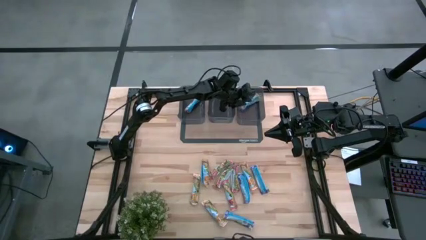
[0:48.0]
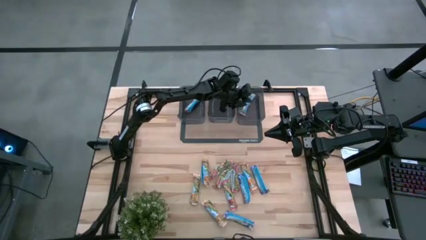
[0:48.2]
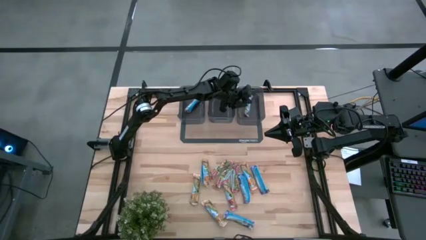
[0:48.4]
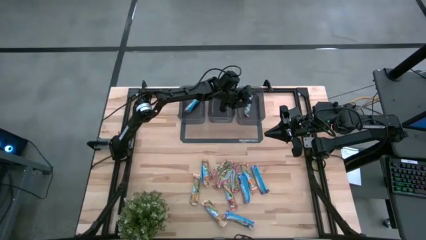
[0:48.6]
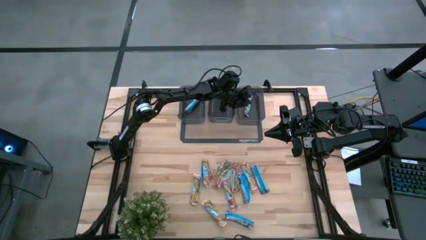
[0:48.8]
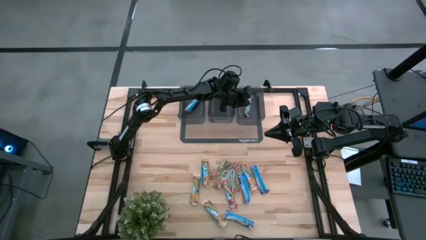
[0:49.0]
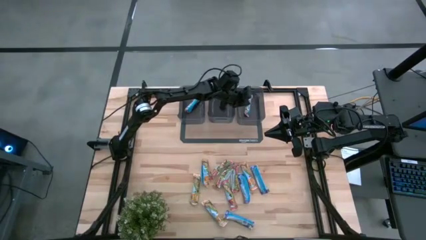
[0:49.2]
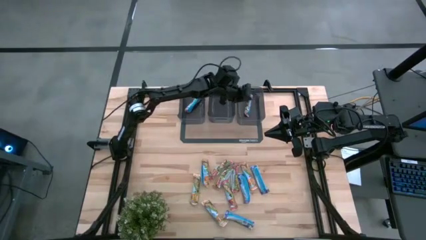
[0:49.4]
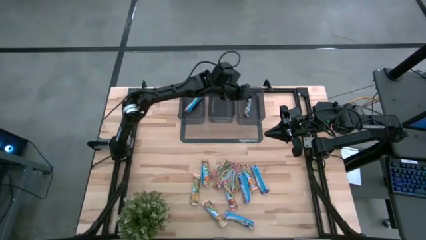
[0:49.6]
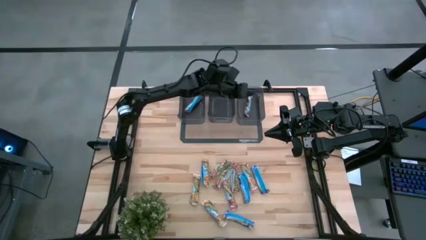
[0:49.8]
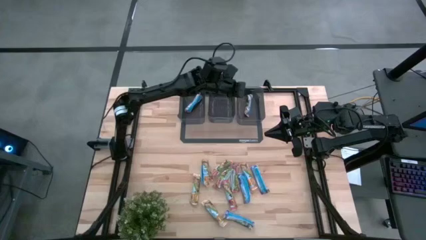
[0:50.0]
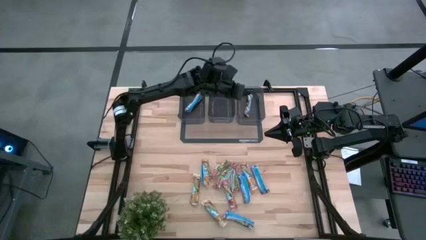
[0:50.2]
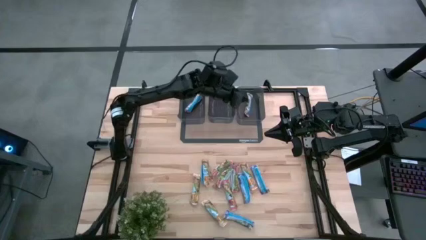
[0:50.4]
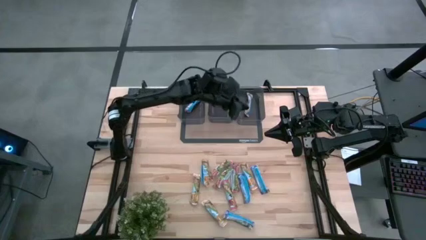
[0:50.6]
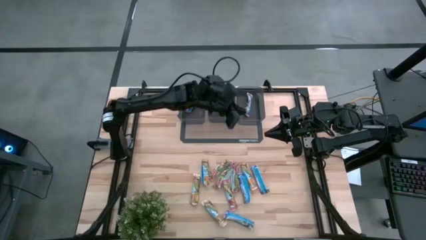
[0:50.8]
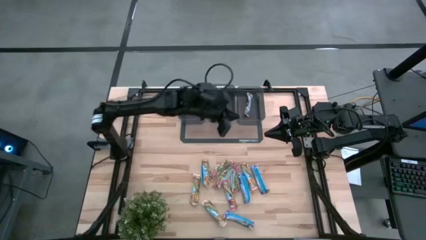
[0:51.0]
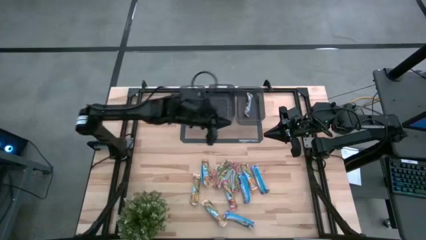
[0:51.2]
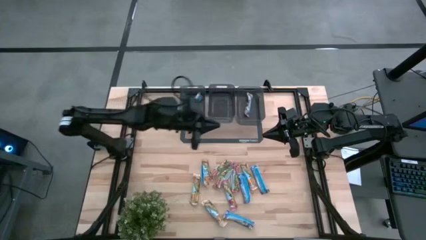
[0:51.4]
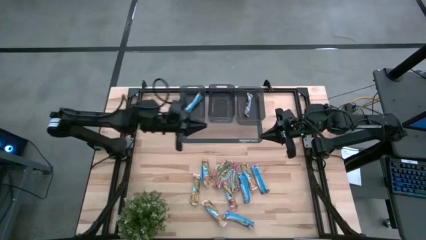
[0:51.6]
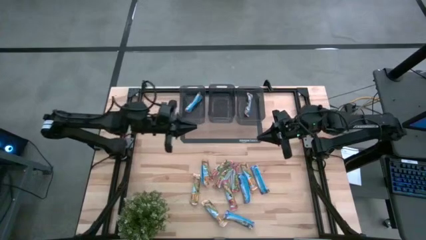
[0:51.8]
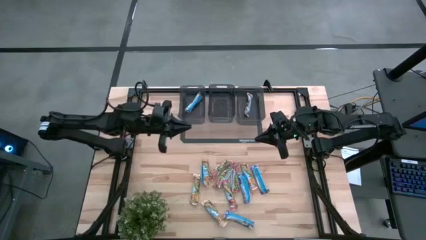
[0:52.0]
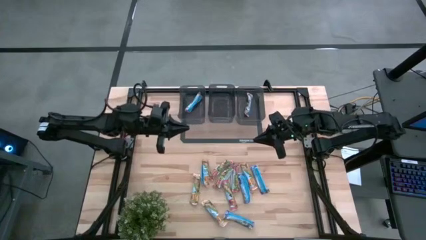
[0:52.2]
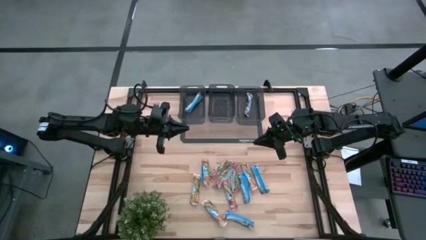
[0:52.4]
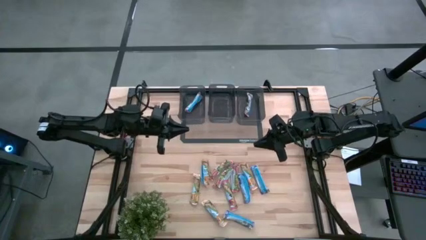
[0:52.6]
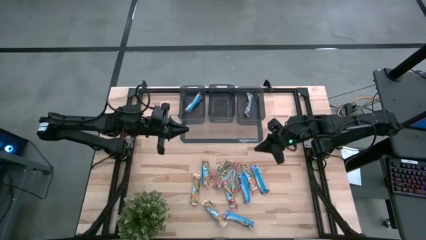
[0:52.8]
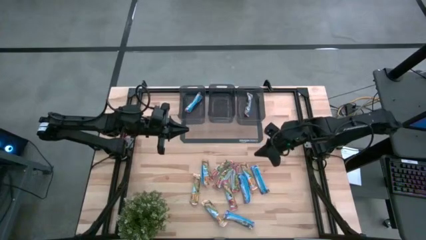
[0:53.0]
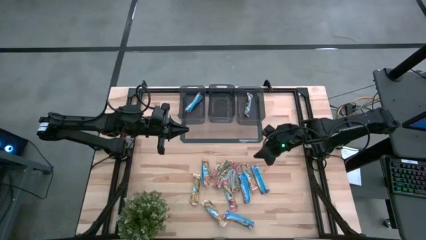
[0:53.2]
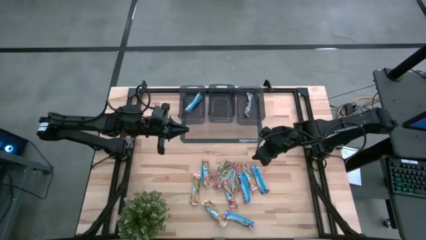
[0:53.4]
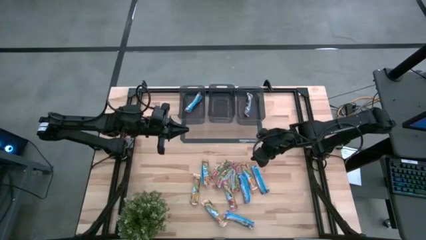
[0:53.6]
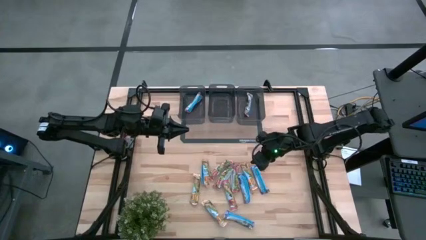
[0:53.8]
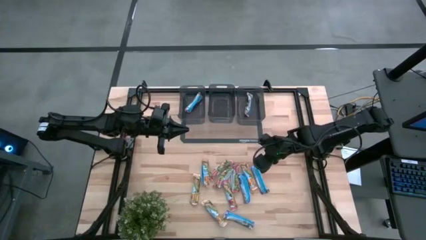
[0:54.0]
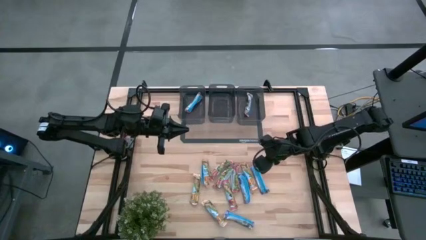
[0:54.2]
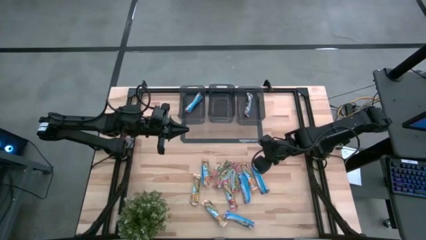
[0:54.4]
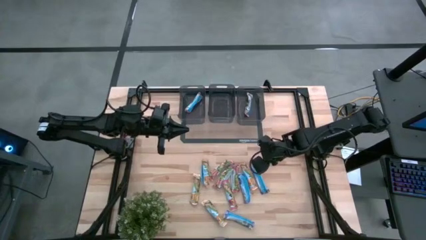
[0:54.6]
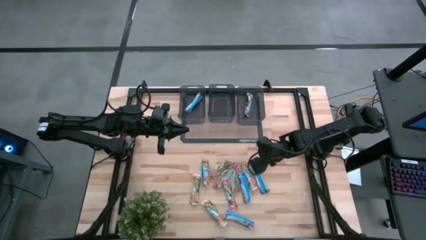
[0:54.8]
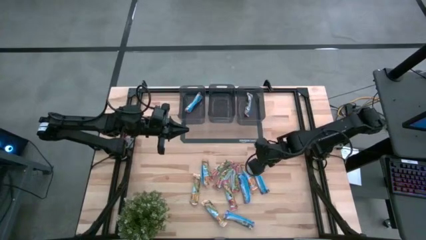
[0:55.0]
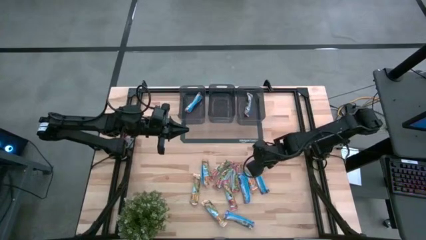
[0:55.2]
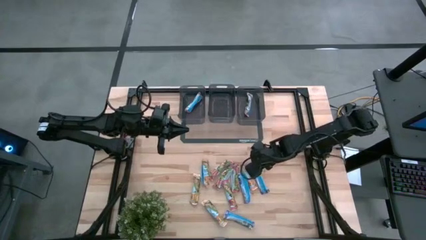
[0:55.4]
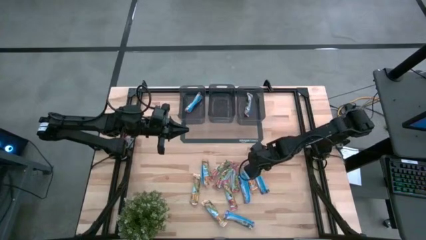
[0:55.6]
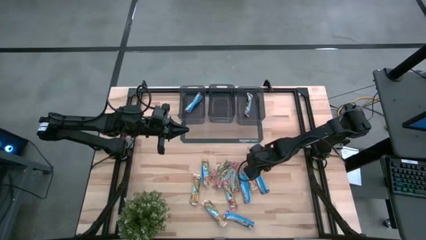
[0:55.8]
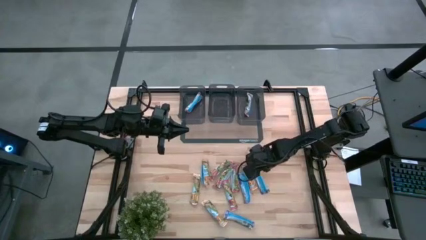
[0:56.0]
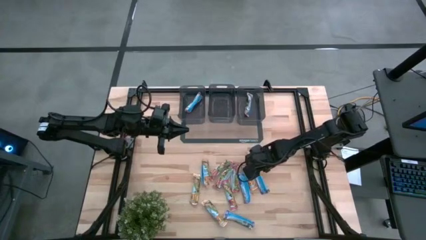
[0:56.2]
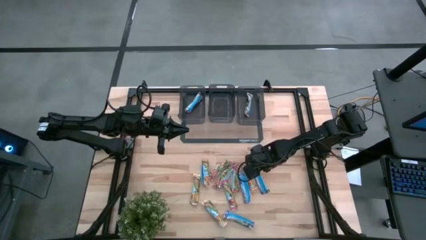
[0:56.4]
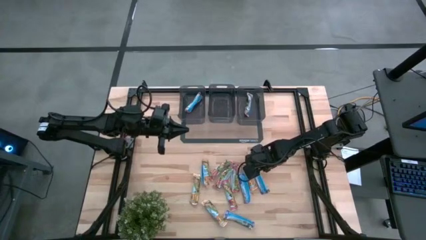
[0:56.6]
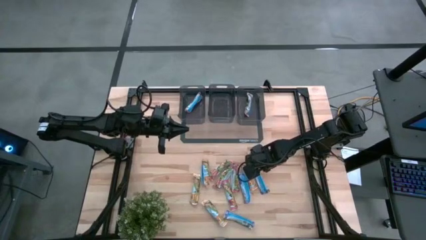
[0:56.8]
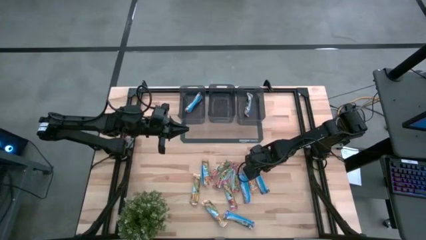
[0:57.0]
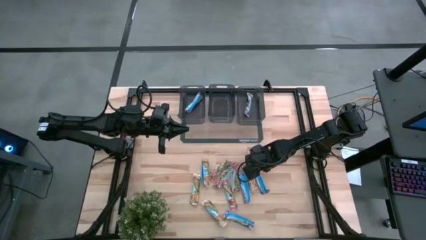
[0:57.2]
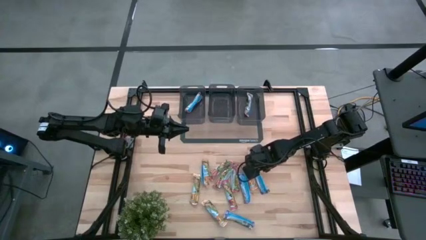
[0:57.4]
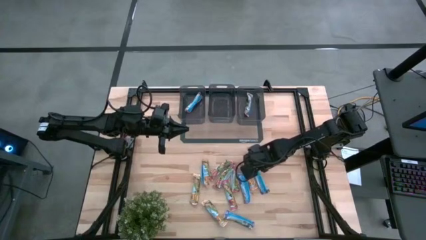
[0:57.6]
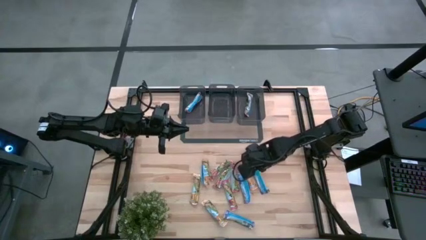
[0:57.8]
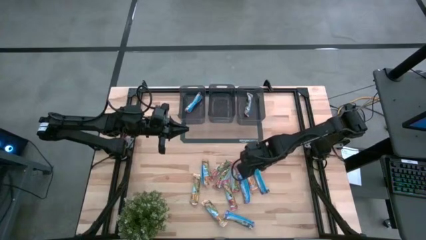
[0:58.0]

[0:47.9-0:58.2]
Task: Pick and place Granola Bars by type
Put the blue granola bar into the center black bin

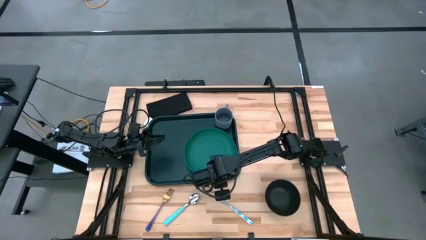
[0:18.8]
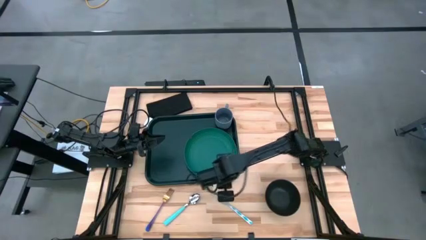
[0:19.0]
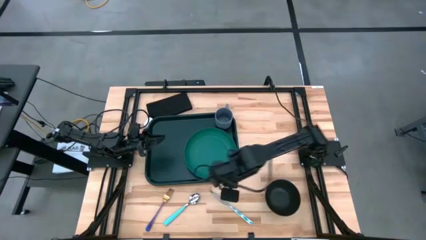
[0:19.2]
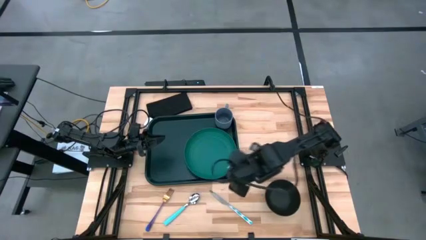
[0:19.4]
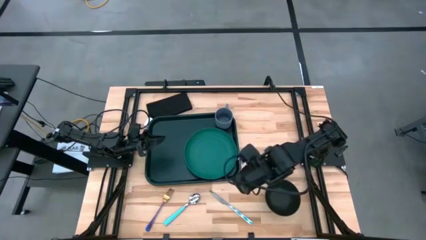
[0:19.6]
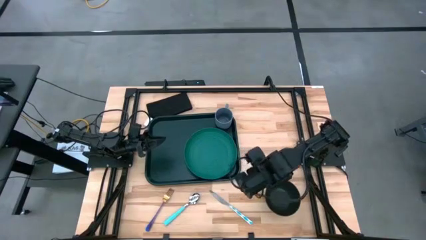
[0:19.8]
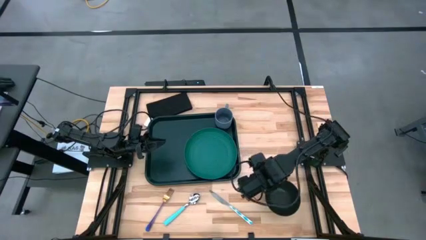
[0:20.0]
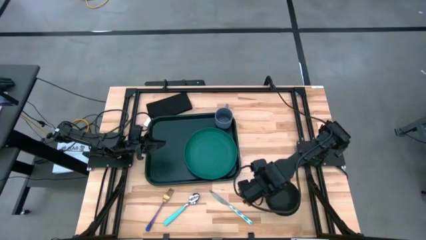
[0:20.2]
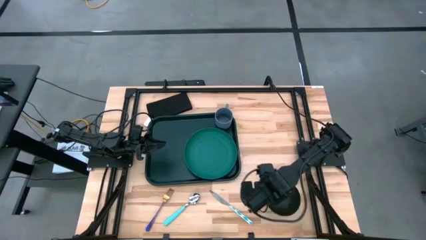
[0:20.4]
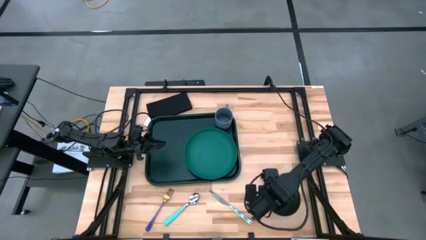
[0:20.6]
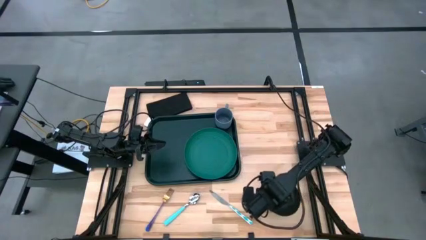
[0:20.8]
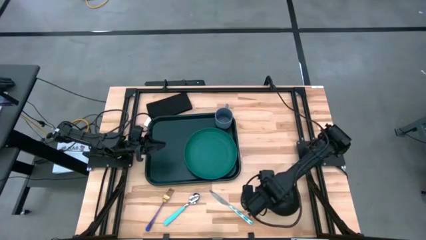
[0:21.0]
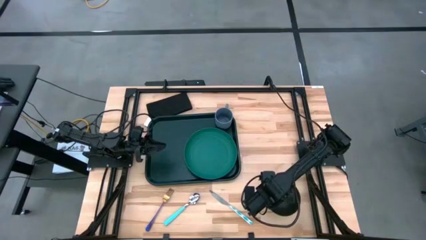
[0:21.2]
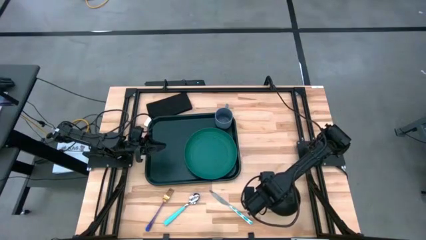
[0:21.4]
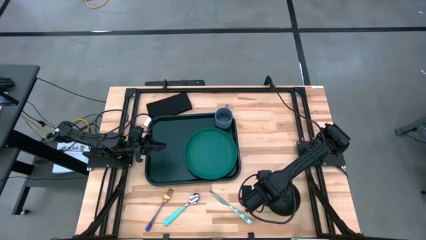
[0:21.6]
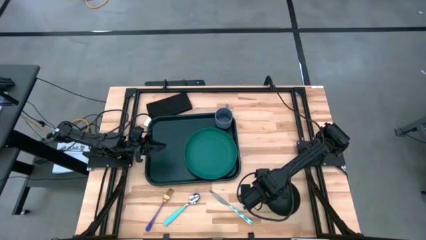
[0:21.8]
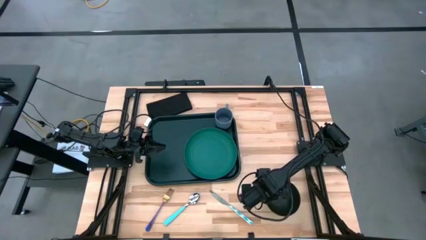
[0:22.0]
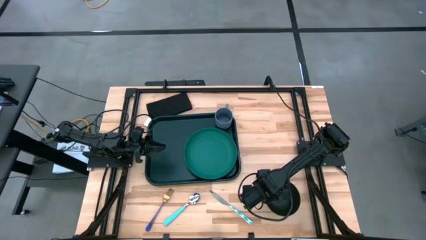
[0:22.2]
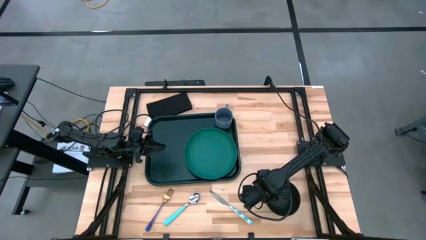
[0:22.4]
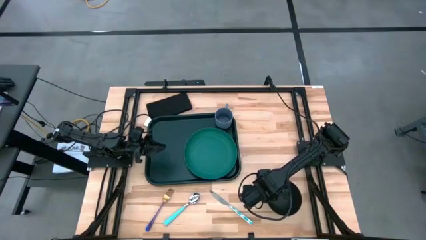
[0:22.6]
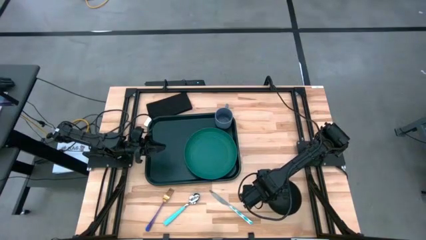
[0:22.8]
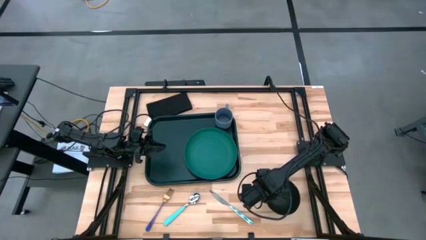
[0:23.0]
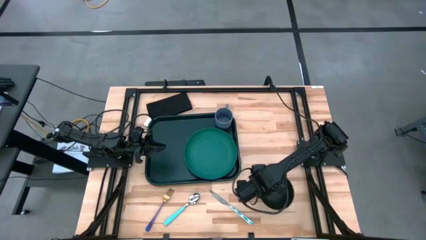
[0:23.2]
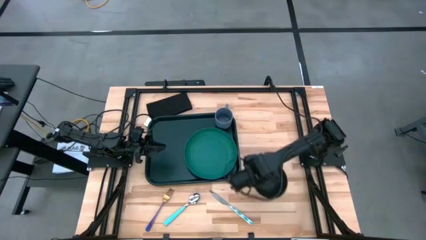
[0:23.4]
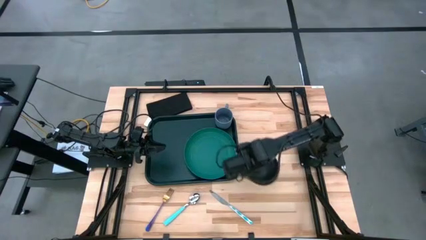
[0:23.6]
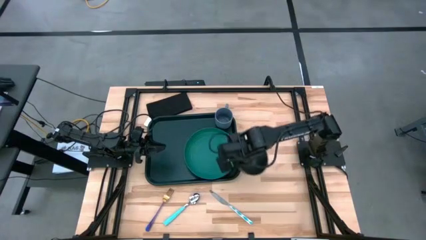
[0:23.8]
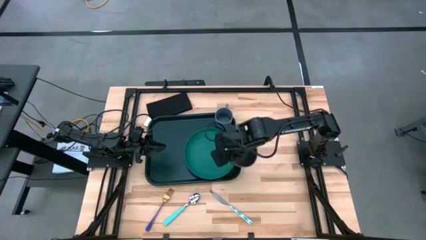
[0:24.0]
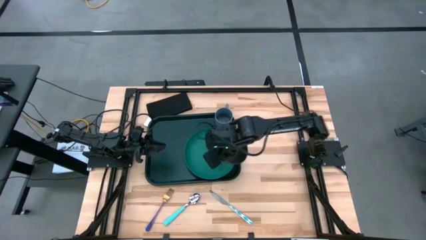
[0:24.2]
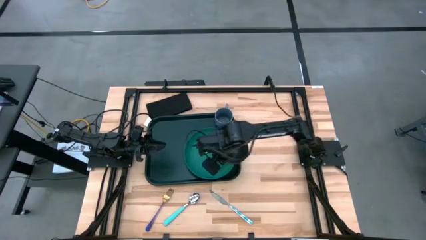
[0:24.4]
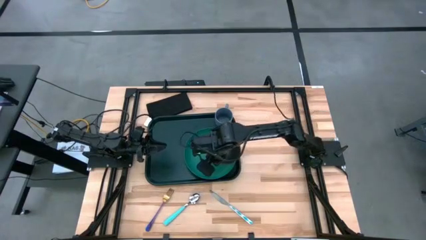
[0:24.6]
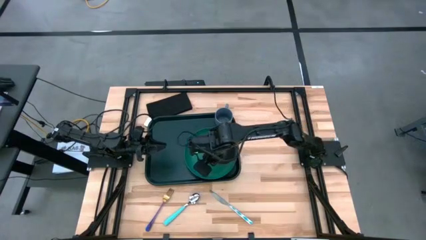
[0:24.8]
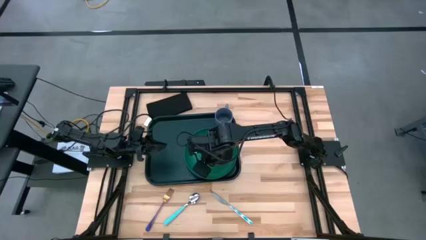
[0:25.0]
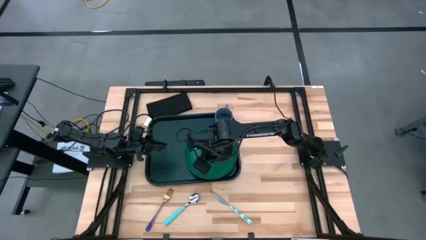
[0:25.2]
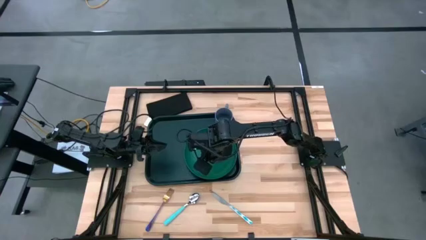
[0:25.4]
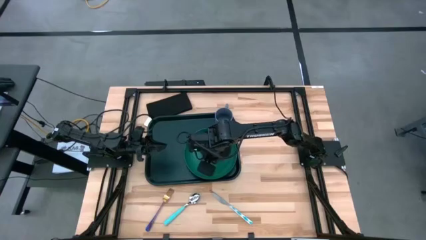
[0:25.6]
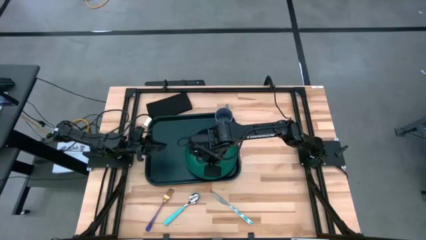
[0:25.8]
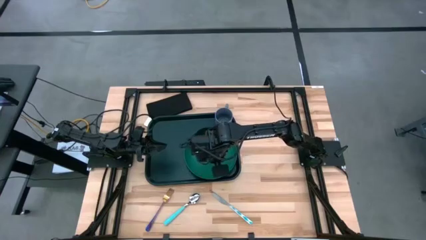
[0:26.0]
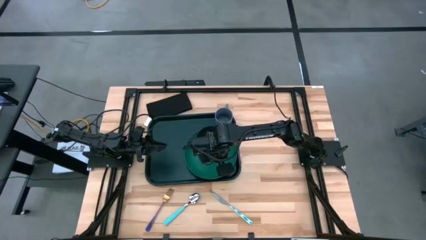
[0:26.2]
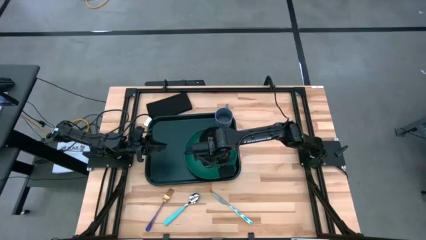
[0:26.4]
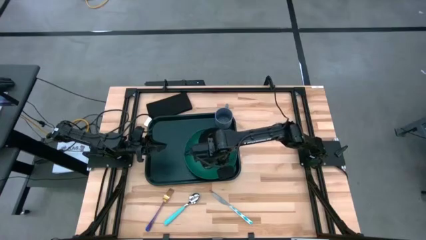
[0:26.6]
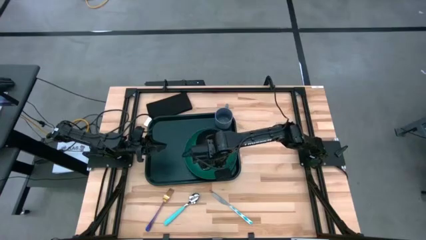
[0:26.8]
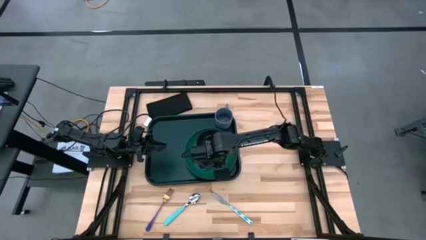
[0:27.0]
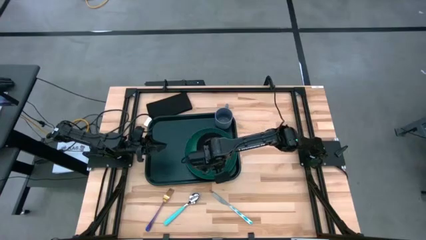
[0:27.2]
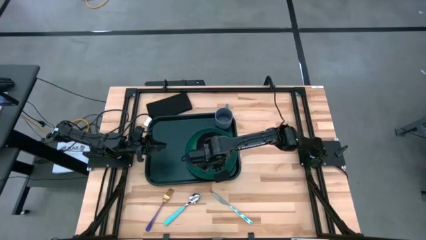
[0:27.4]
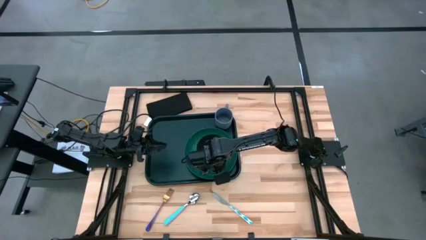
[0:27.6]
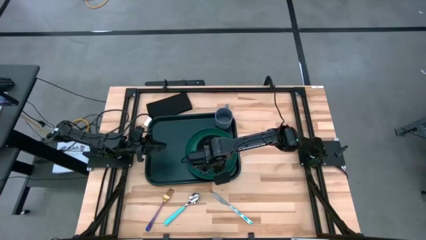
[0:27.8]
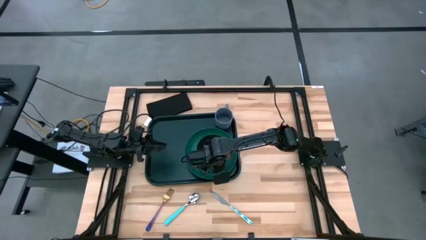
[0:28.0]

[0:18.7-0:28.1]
Task: Set up tray
Put the black bowl on the black tray on top of the green plate
